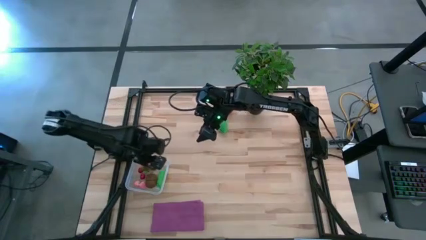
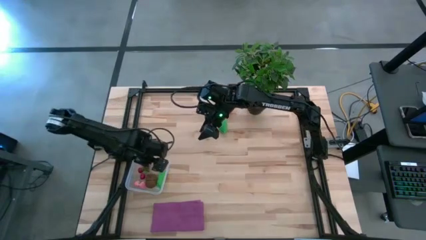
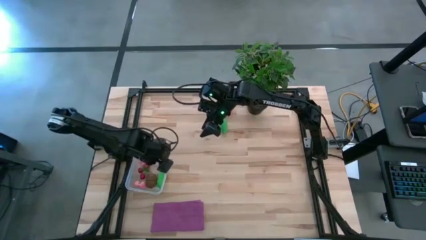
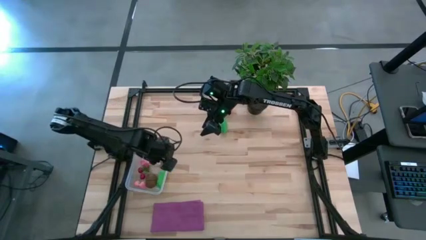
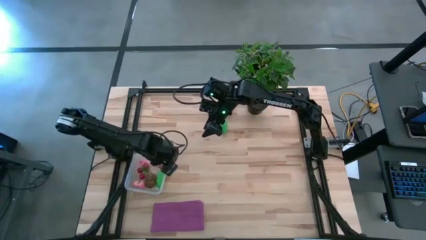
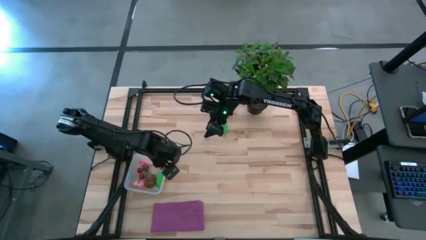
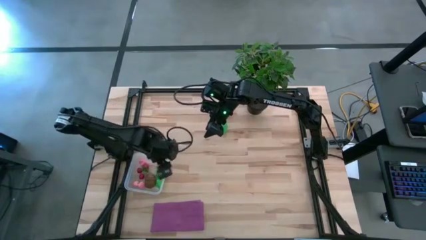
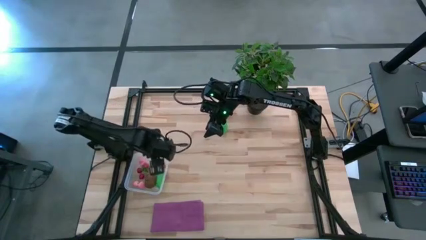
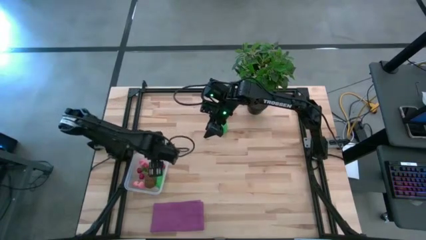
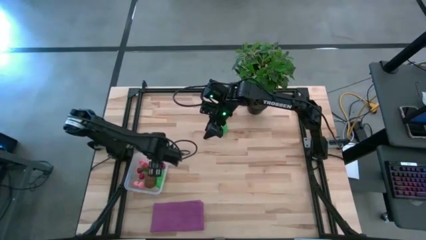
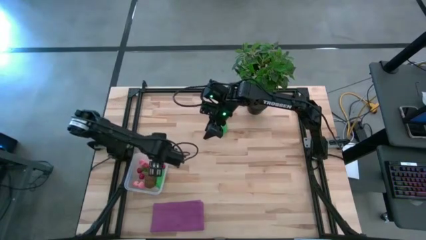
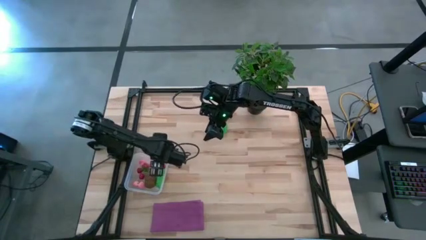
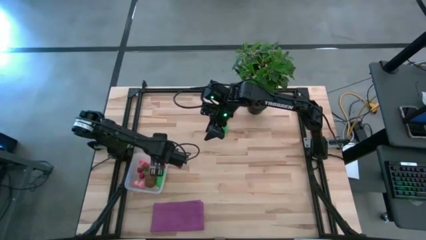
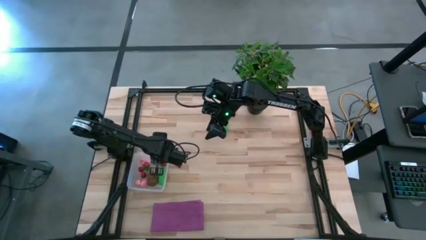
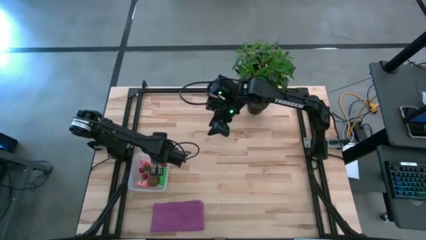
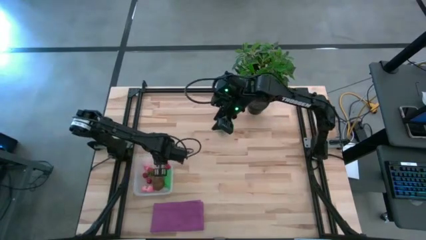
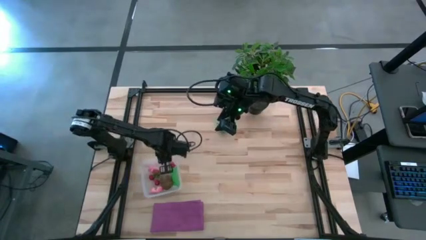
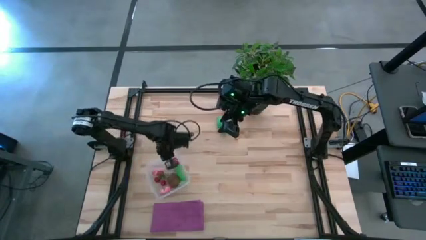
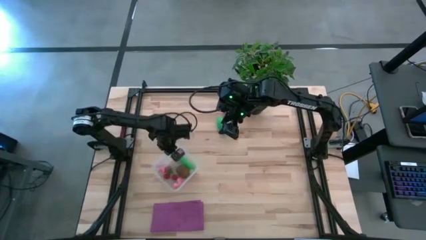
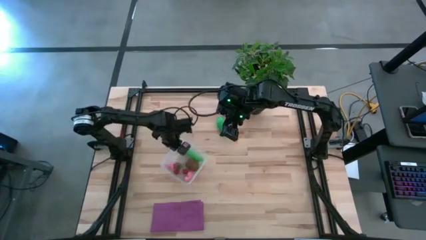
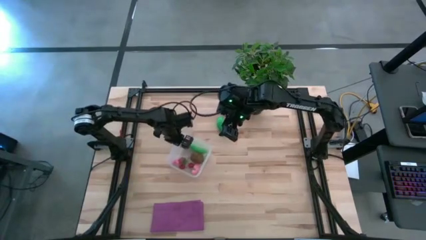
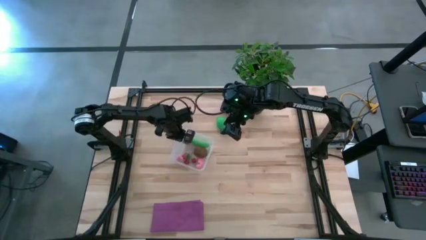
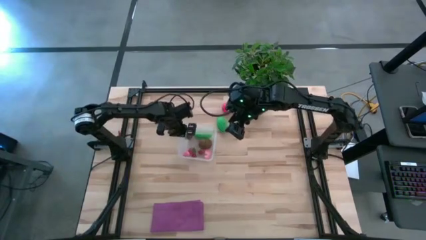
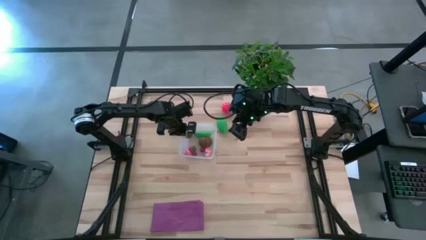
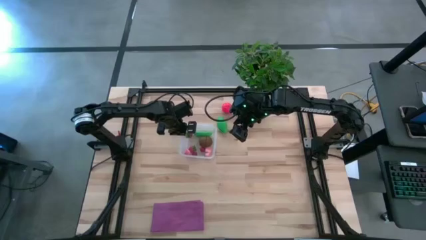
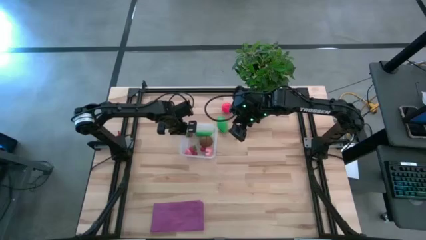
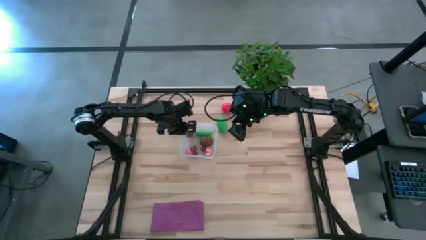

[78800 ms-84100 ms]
Task: Pick and placing Produce into tupperware
Move the transparent container to the center of the table

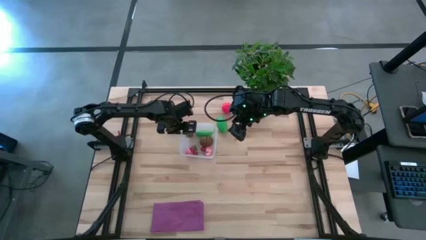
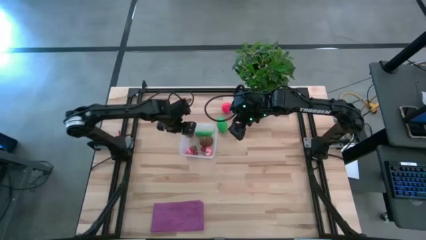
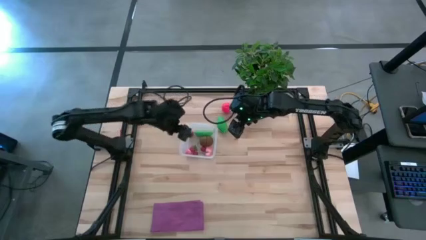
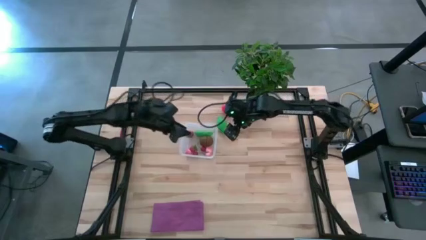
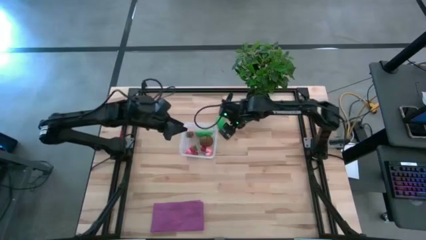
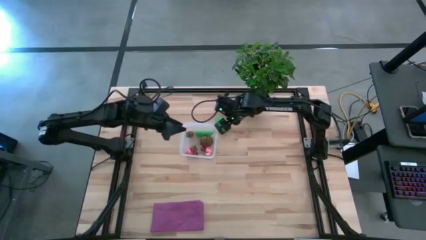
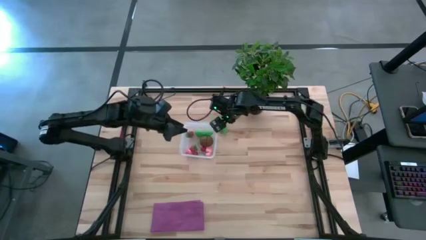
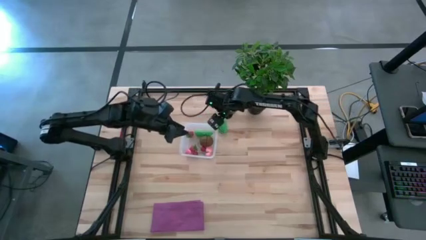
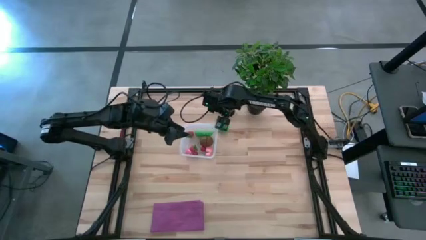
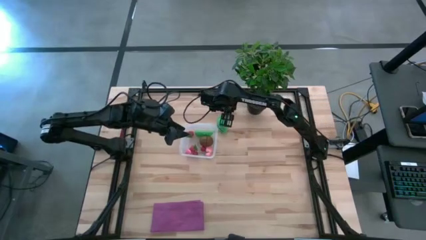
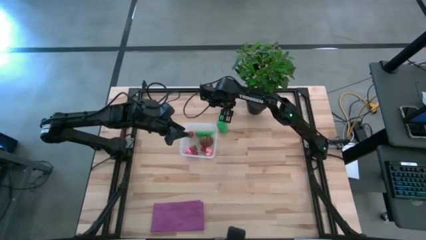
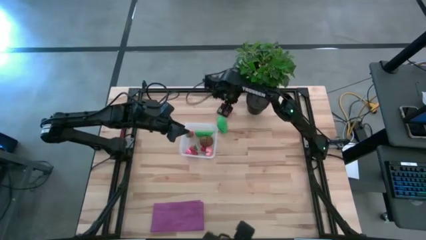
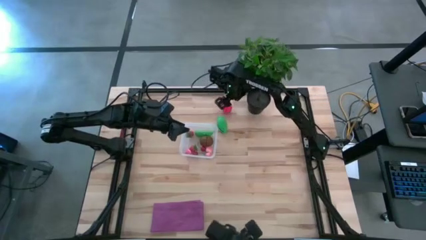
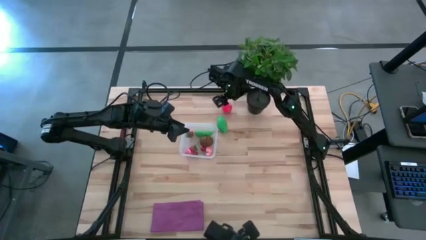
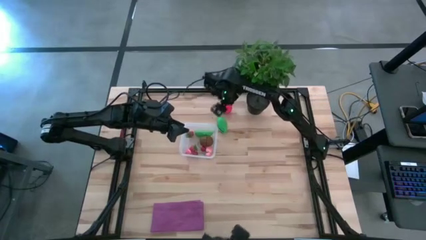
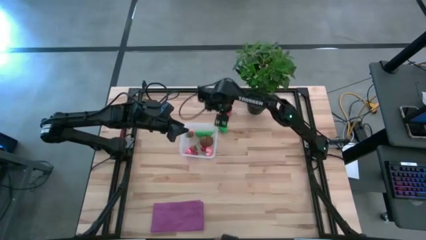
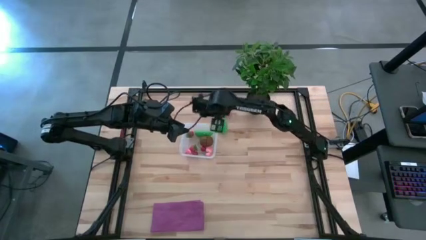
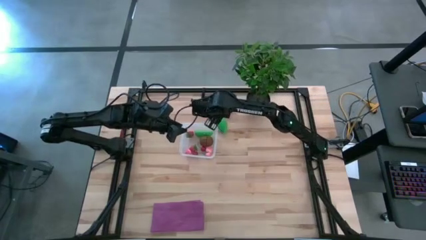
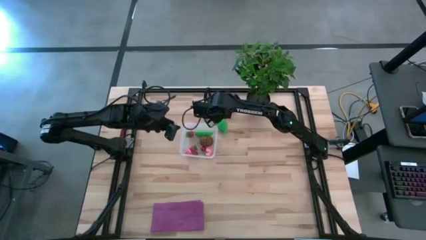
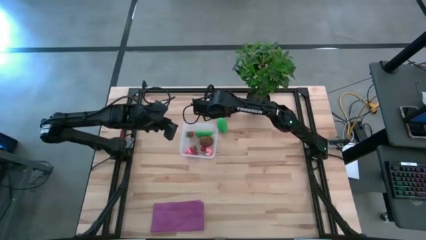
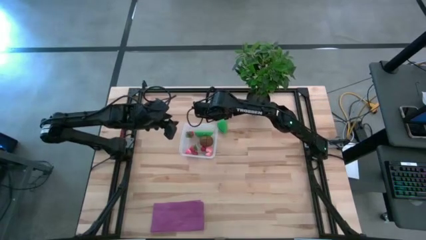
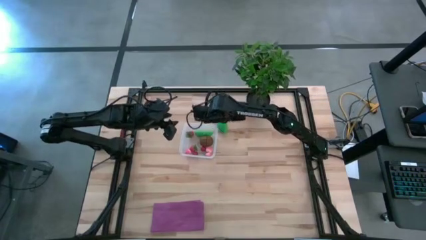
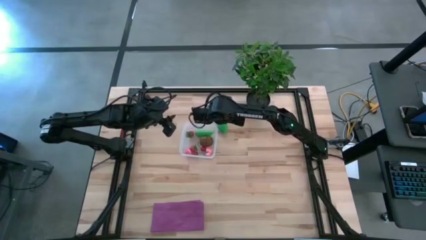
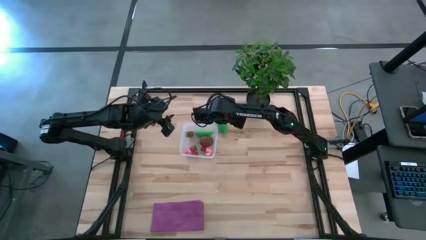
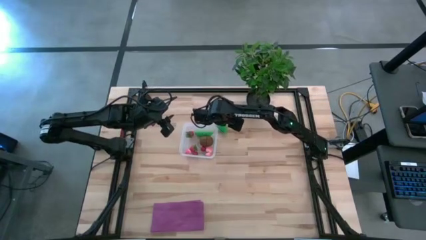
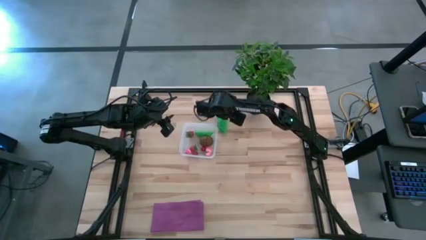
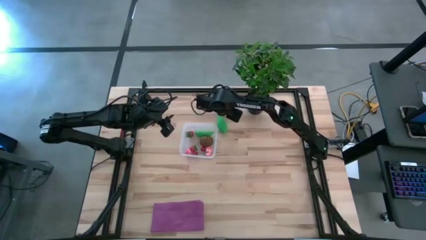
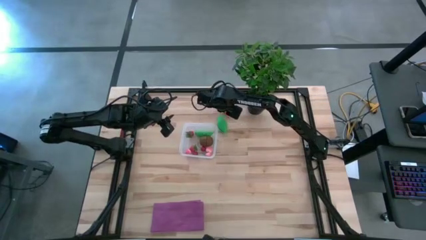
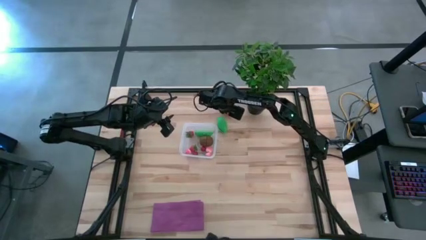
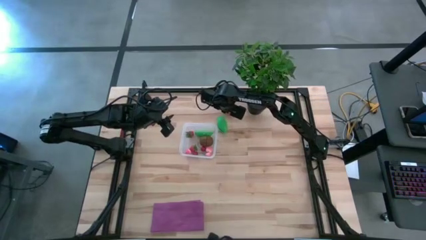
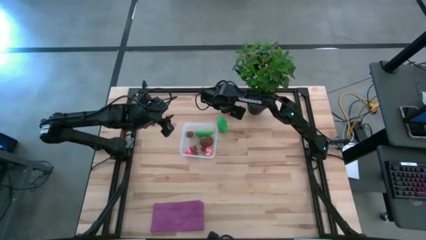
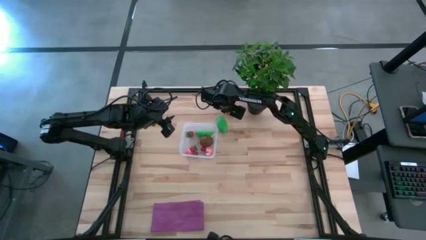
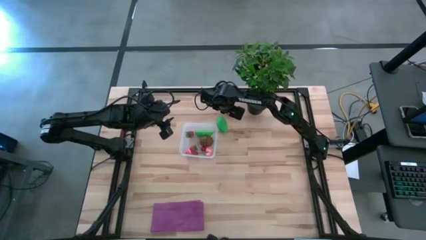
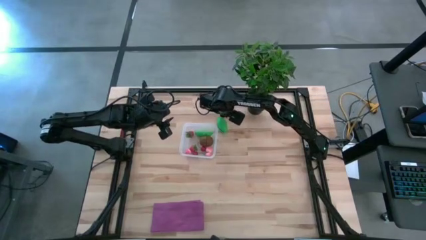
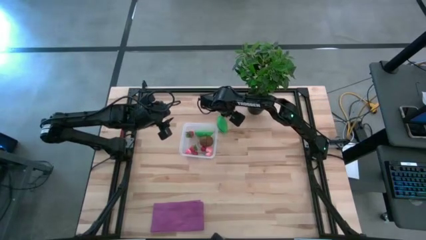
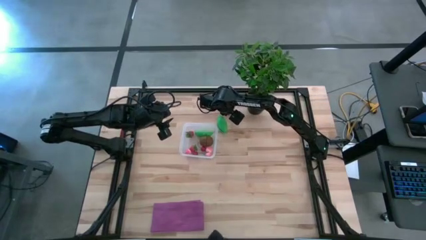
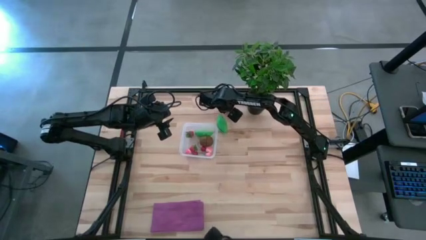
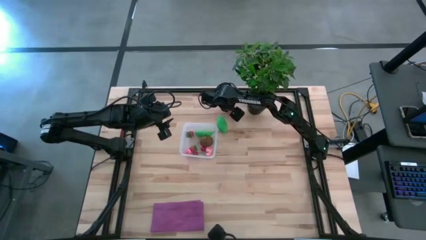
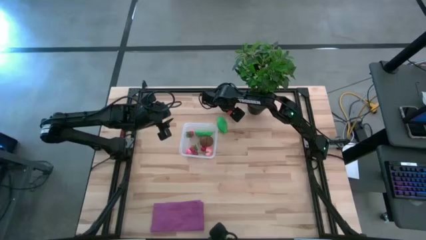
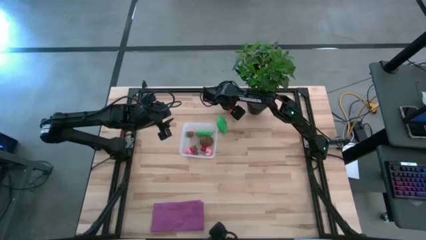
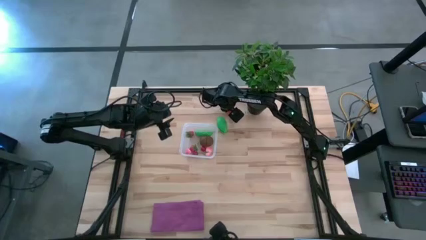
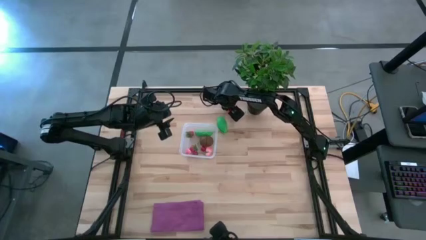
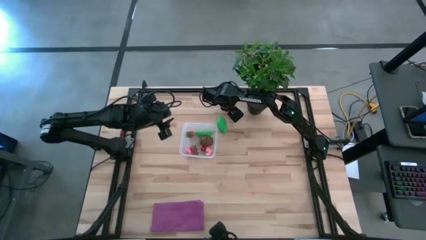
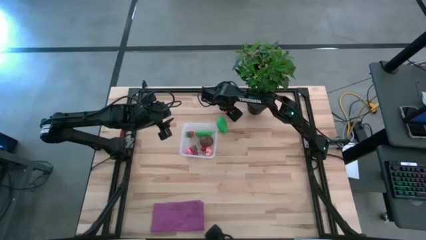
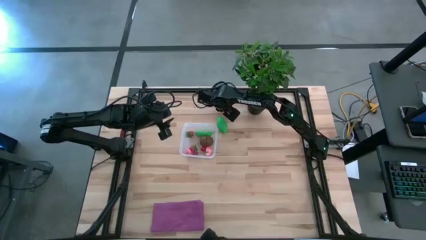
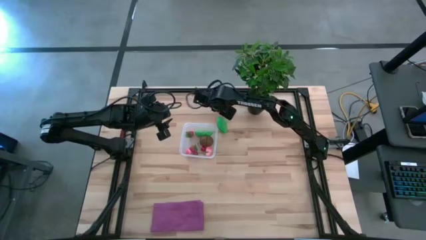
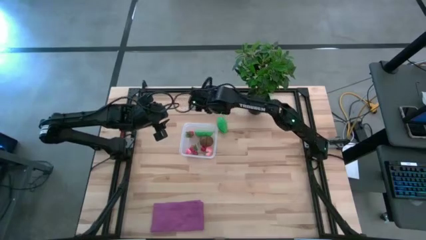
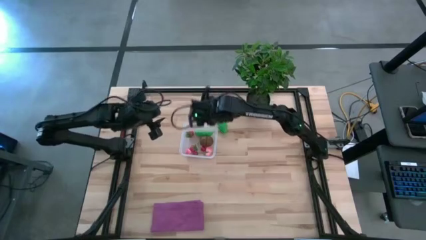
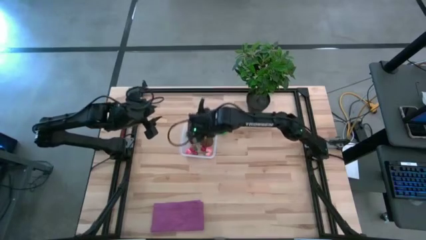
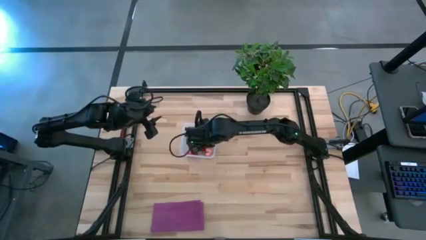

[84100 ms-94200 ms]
Put the red tomato into the transparent container
